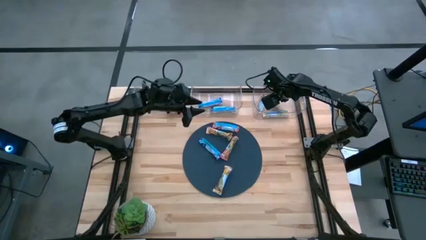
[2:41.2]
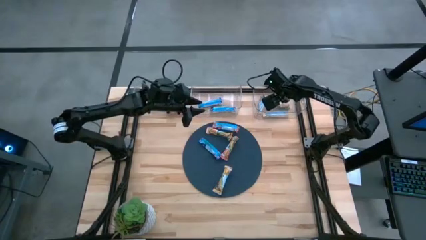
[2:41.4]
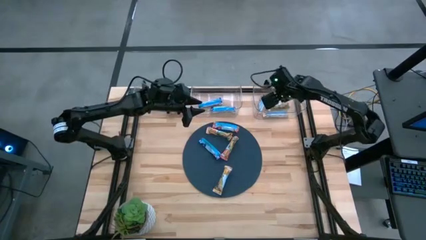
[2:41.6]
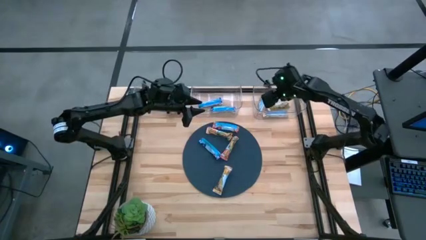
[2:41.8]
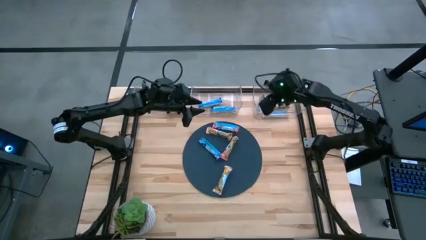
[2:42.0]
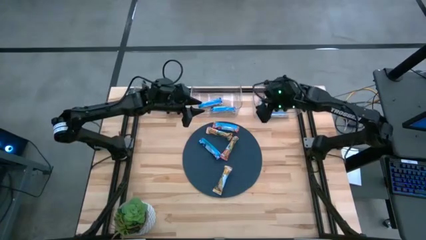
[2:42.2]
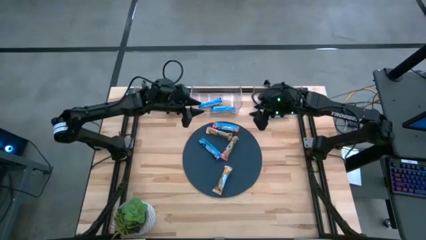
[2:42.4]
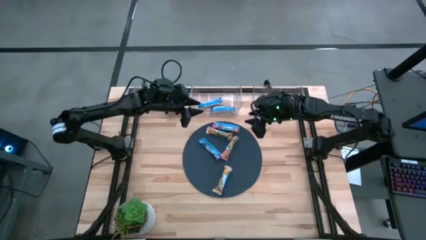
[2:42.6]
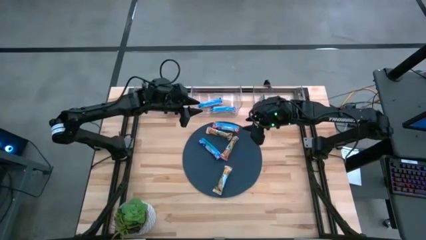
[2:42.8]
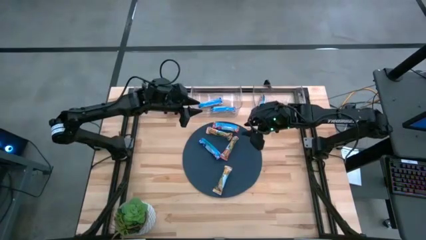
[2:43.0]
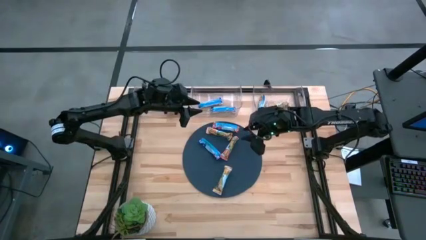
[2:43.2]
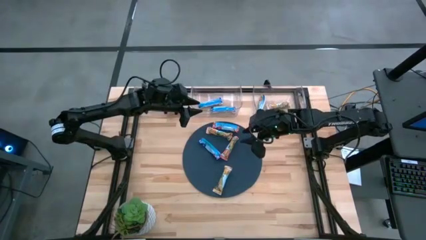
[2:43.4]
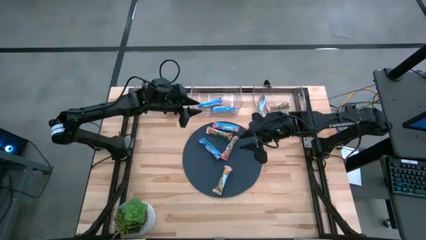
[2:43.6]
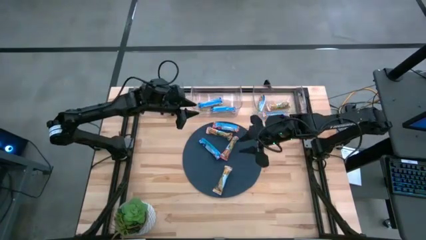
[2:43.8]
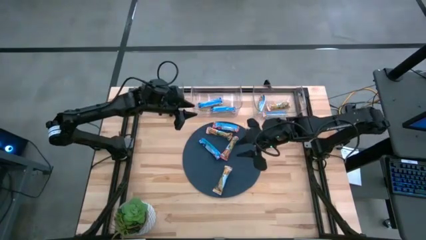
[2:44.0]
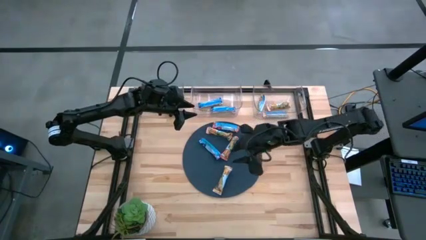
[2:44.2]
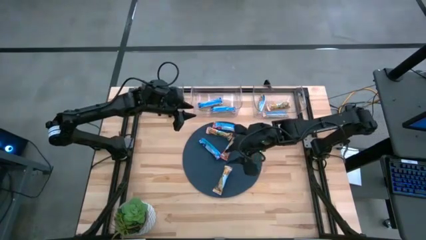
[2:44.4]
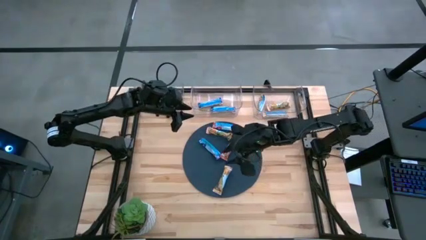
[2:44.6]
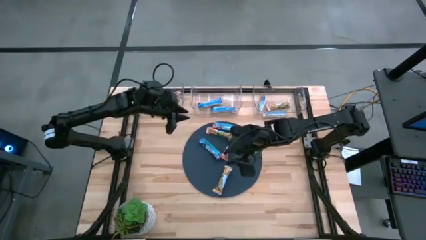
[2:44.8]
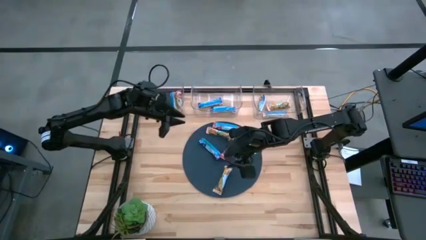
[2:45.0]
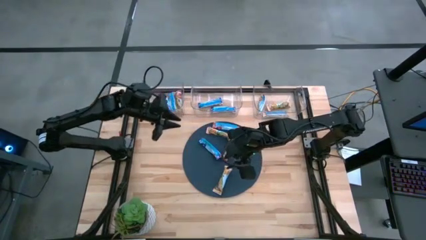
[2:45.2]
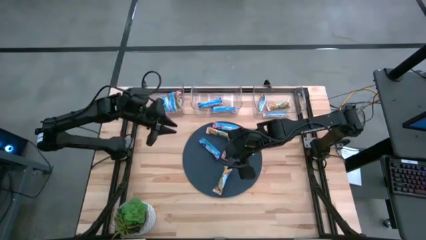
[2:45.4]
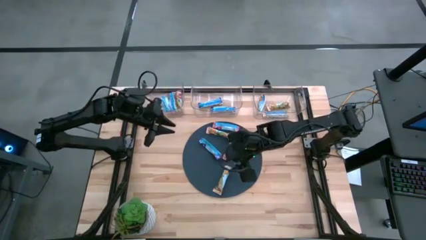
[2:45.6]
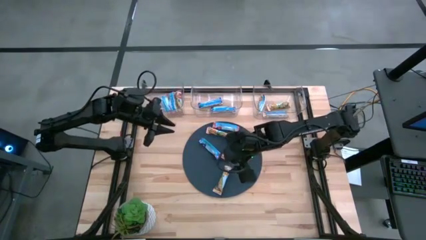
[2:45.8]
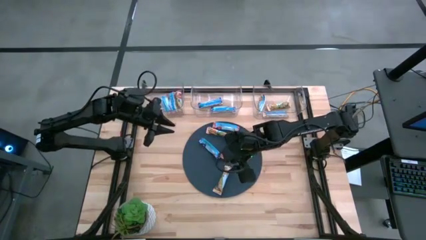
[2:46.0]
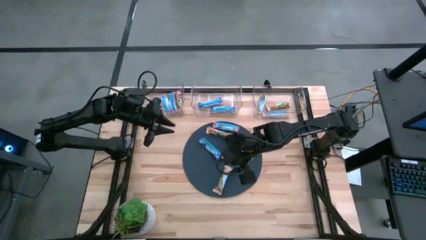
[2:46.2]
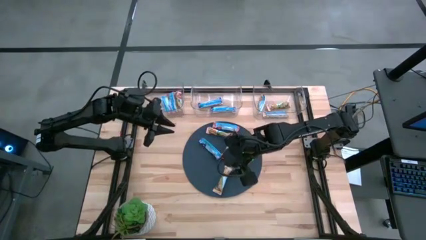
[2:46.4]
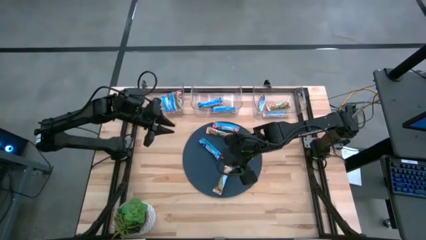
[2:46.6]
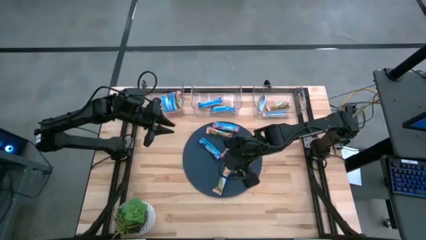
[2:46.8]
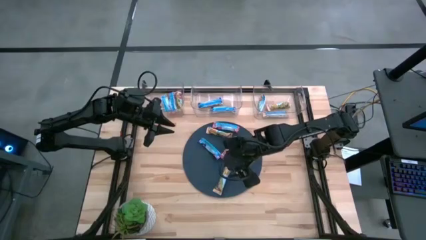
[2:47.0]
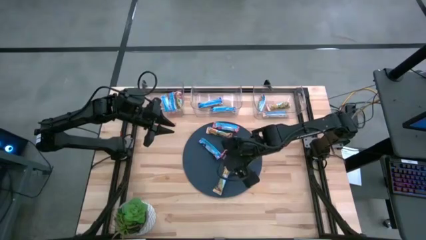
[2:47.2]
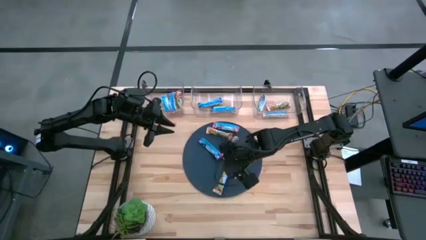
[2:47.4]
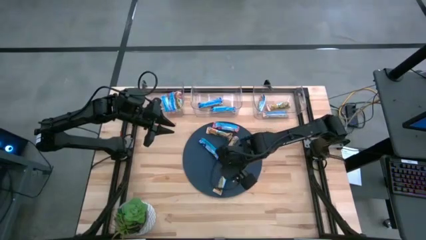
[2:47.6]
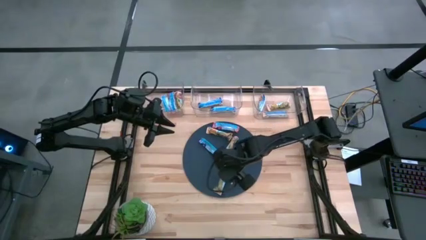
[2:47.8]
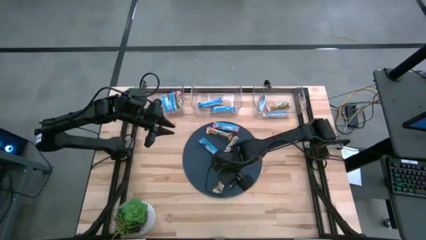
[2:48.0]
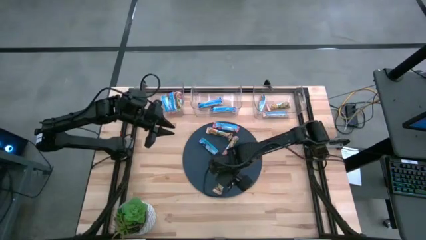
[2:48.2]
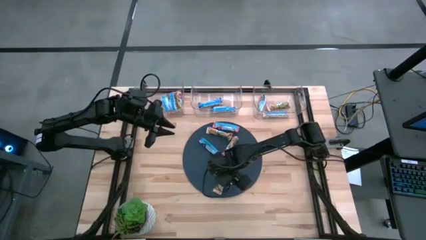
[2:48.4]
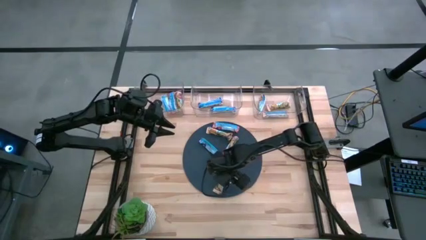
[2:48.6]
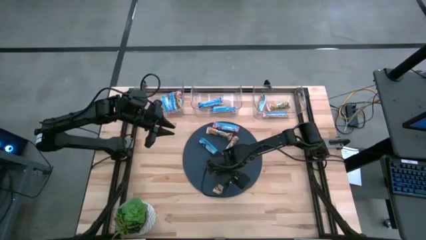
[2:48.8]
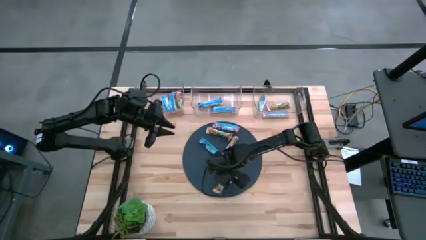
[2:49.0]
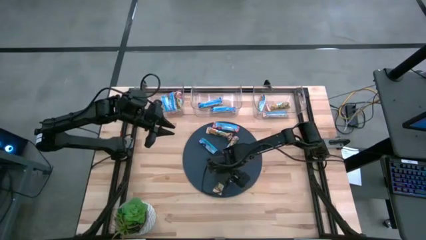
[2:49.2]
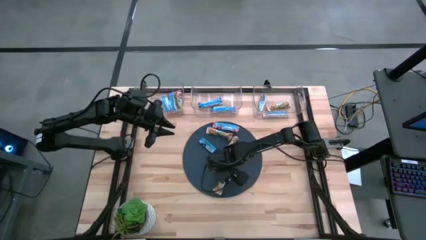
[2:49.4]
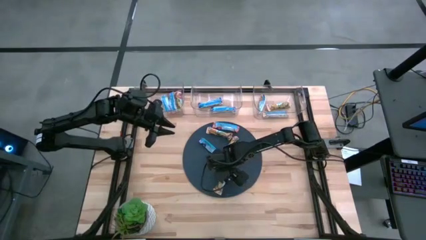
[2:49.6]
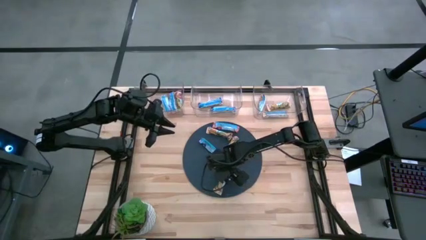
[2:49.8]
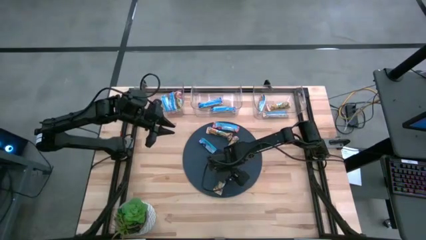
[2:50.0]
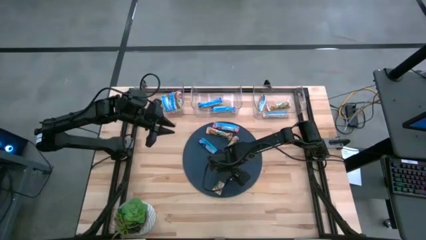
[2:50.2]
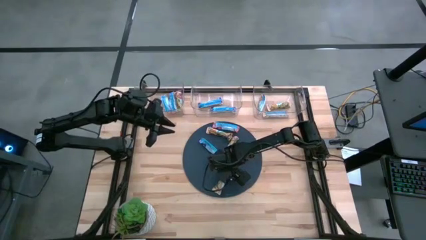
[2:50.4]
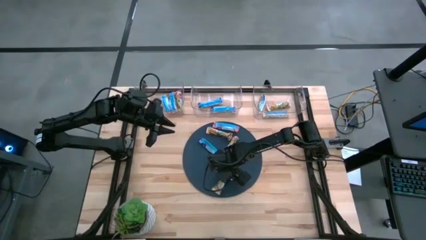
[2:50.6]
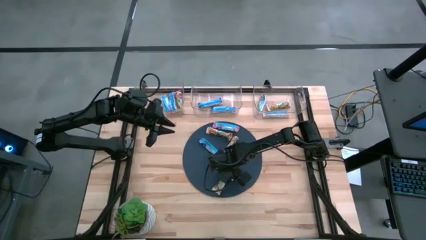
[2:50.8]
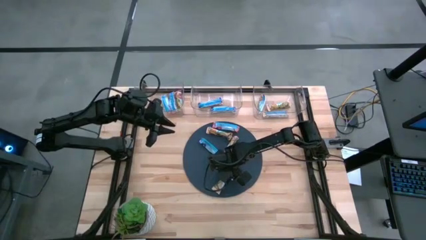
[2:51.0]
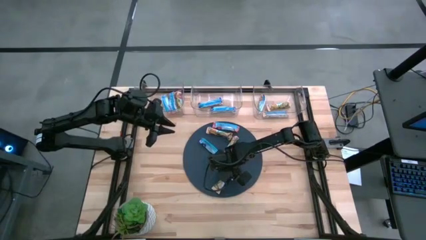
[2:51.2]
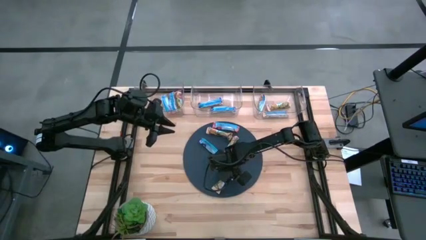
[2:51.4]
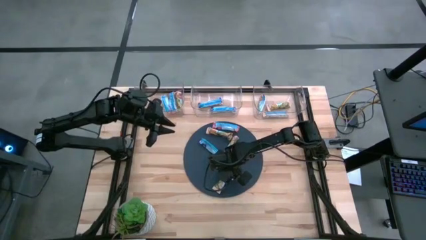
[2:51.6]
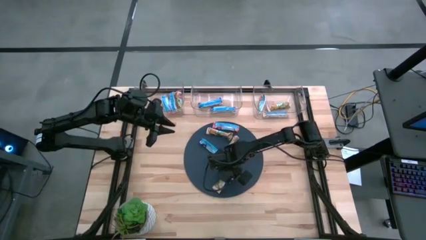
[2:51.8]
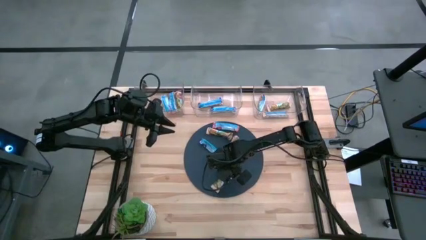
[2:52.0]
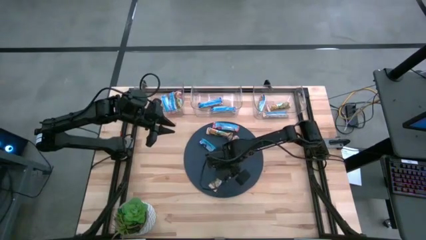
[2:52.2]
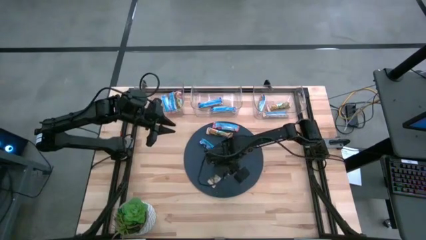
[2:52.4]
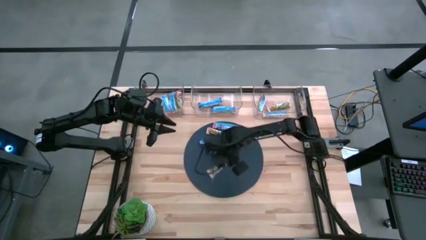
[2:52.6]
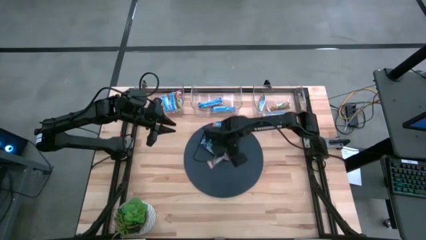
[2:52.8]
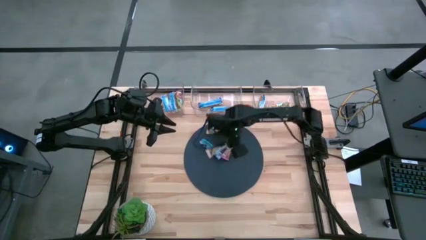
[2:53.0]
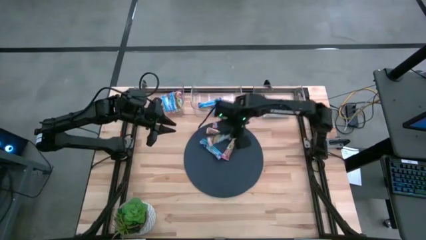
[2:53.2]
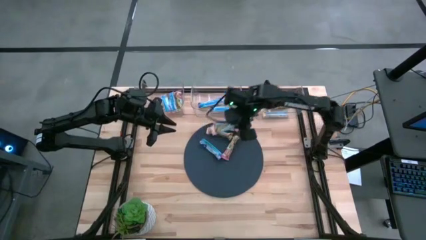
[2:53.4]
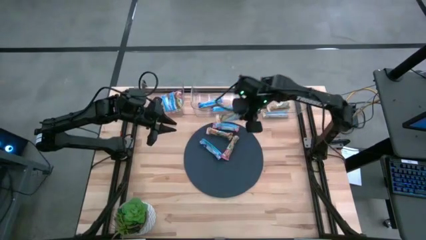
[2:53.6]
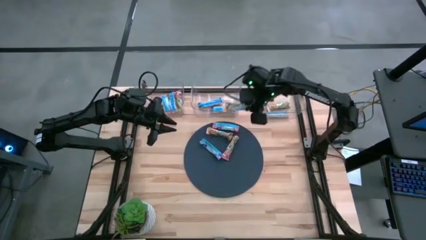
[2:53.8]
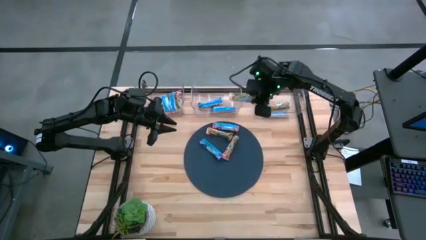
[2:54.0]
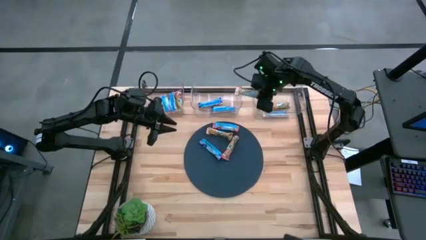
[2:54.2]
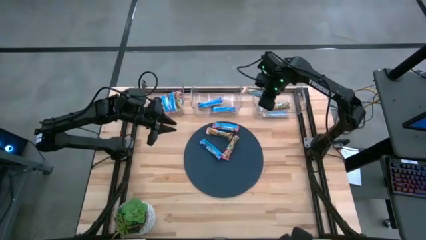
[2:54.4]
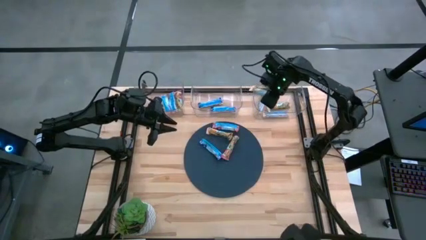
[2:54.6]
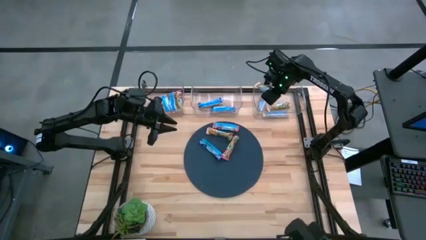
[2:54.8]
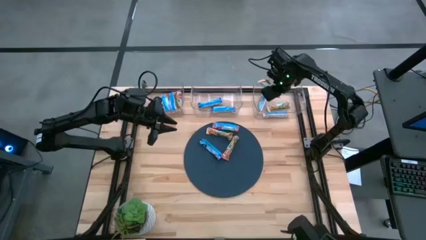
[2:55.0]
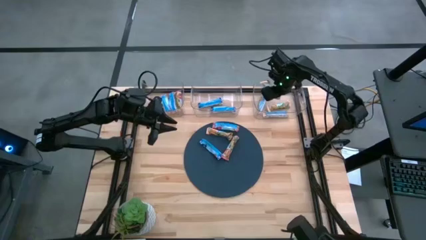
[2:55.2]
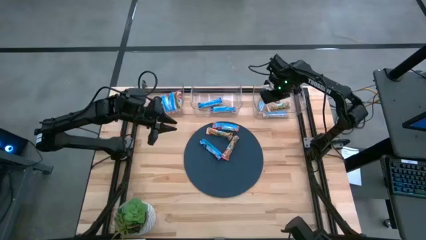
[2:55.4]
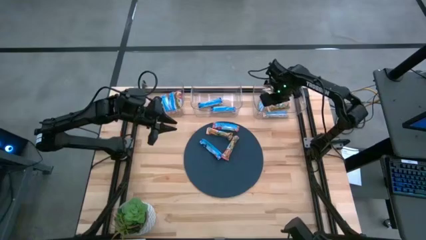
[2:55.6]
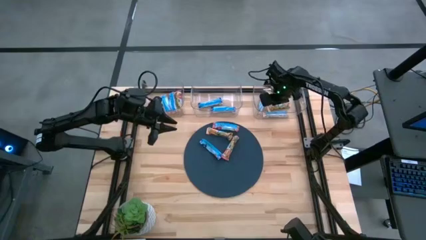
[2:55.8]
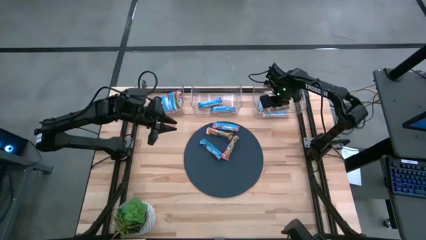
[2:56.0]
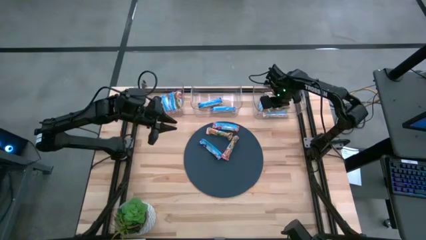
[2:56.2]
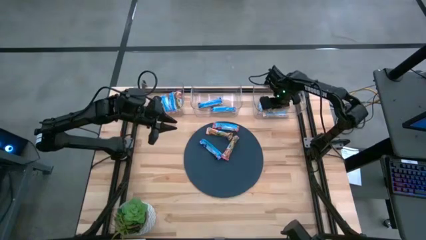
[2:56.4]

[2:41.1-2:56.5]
Task: Pick and place Granola Bars by type
Put the yellow granola bar into the right transparent bin
